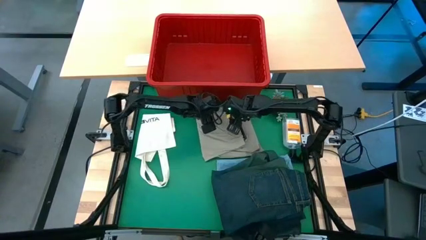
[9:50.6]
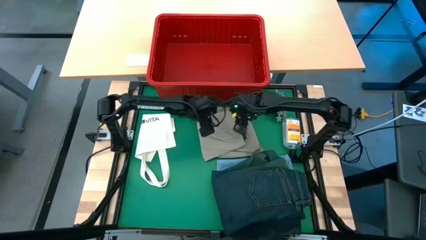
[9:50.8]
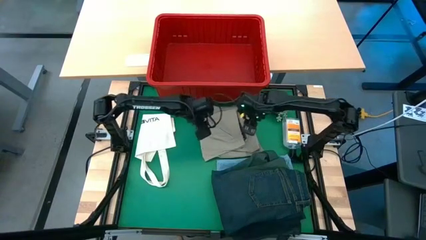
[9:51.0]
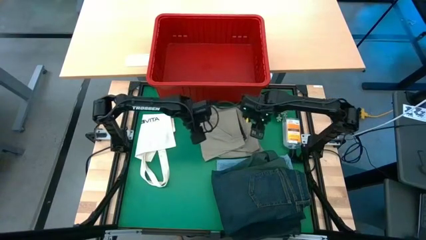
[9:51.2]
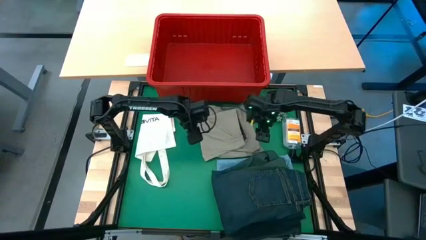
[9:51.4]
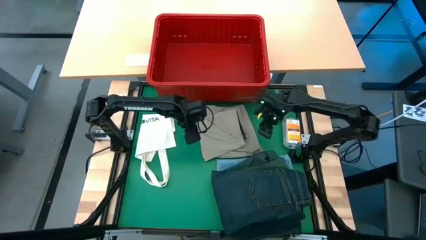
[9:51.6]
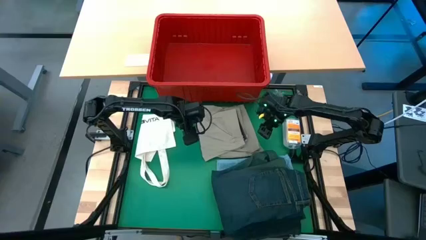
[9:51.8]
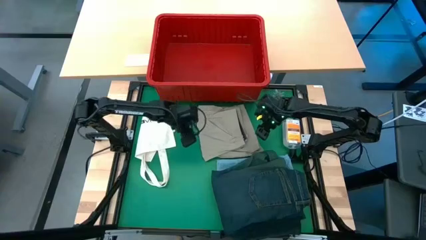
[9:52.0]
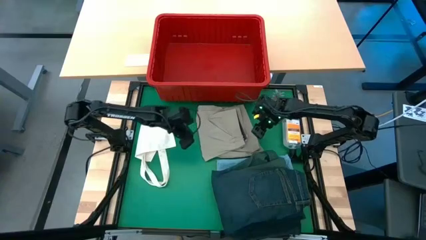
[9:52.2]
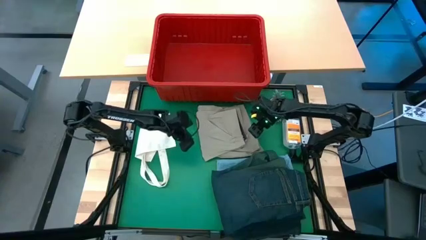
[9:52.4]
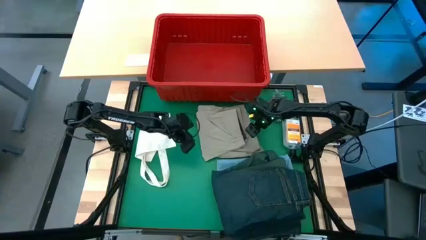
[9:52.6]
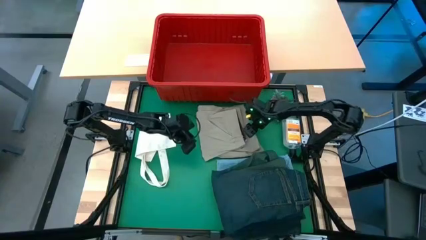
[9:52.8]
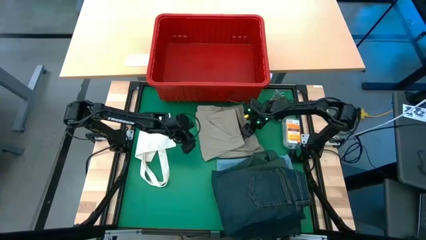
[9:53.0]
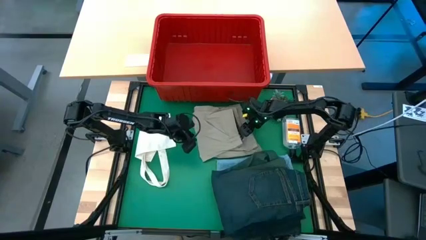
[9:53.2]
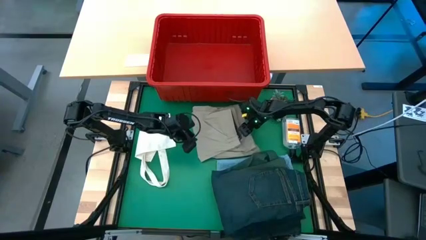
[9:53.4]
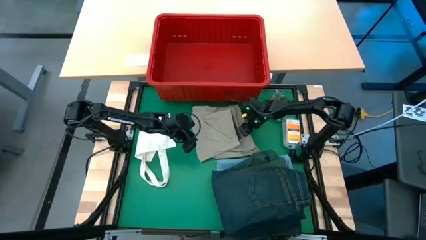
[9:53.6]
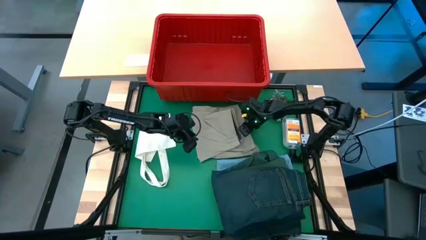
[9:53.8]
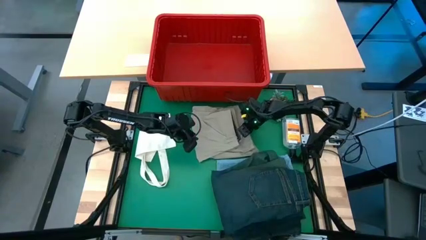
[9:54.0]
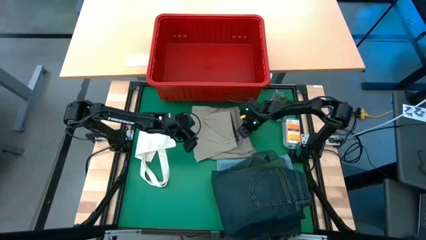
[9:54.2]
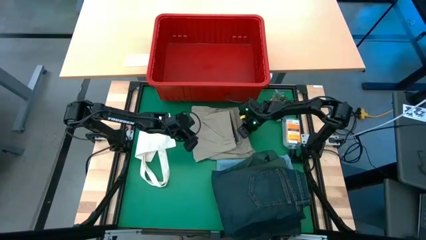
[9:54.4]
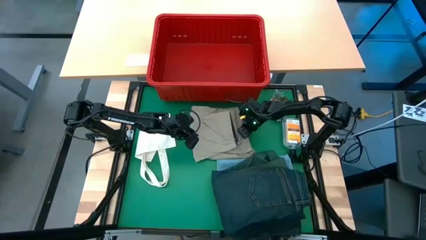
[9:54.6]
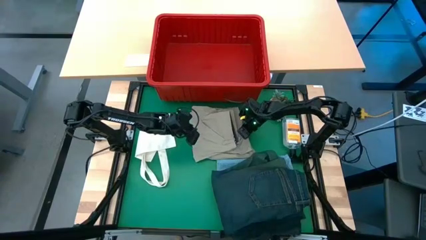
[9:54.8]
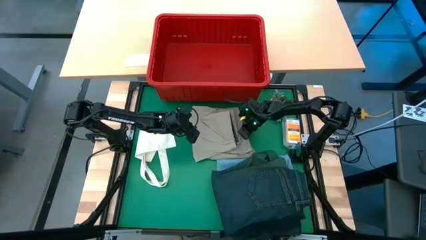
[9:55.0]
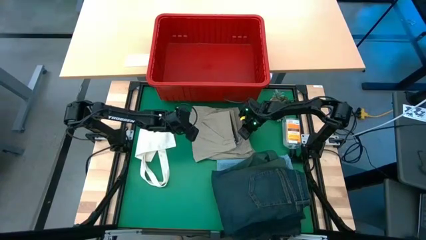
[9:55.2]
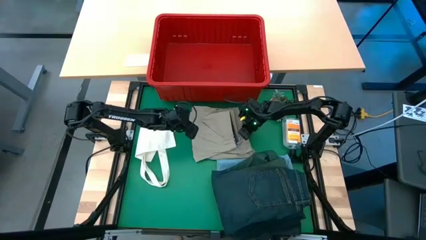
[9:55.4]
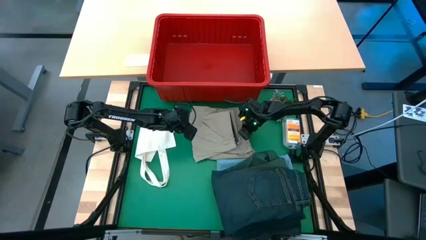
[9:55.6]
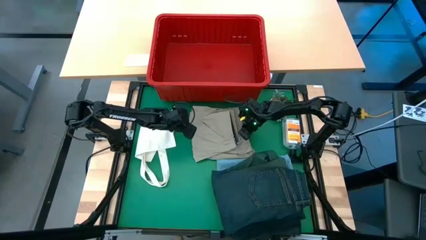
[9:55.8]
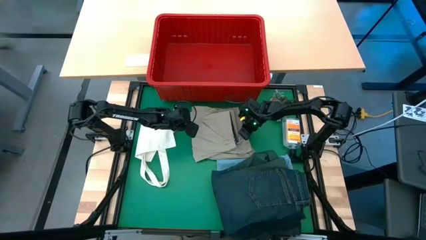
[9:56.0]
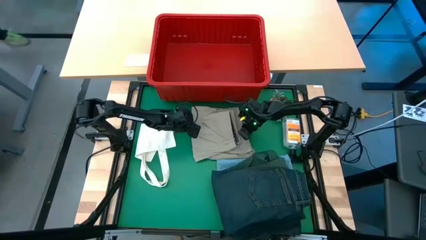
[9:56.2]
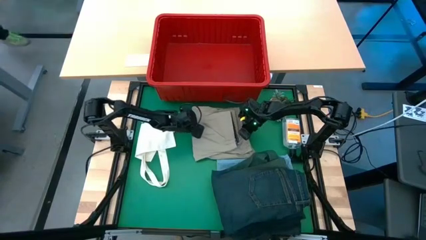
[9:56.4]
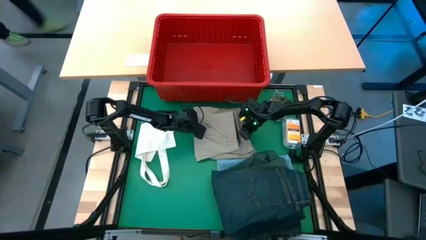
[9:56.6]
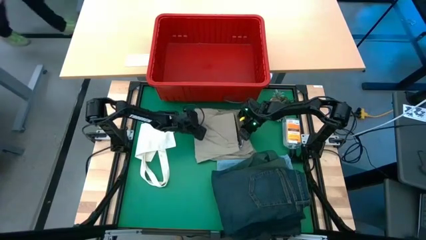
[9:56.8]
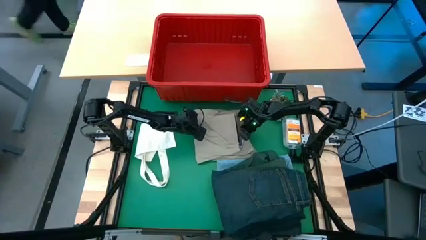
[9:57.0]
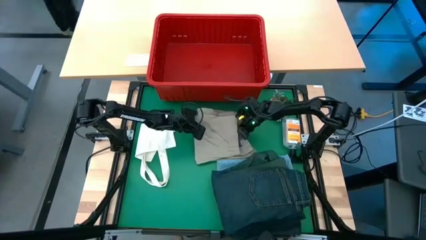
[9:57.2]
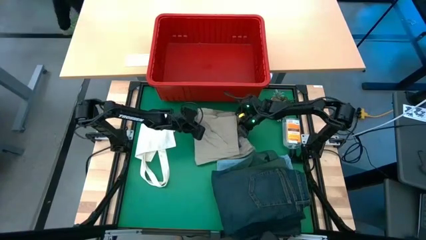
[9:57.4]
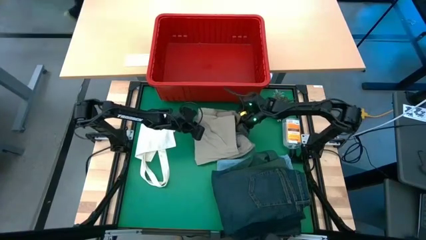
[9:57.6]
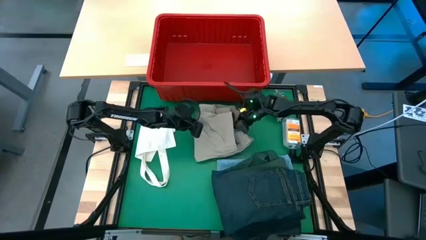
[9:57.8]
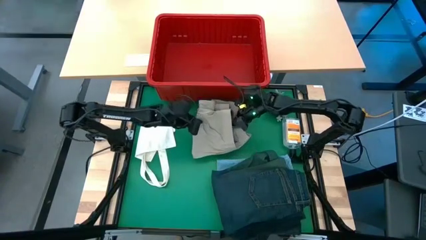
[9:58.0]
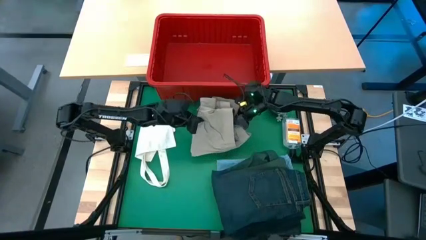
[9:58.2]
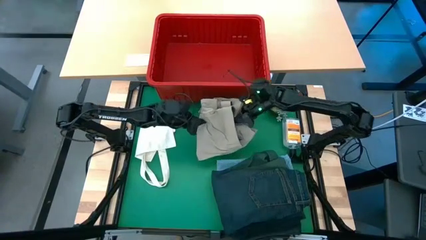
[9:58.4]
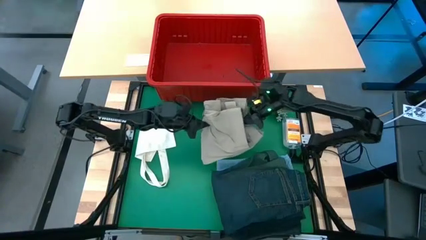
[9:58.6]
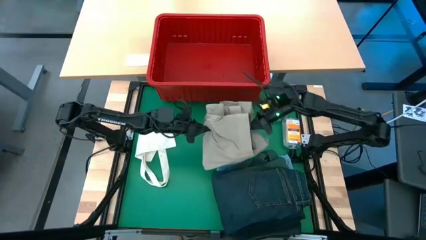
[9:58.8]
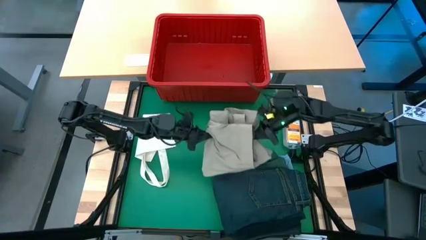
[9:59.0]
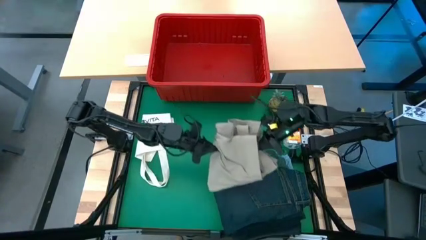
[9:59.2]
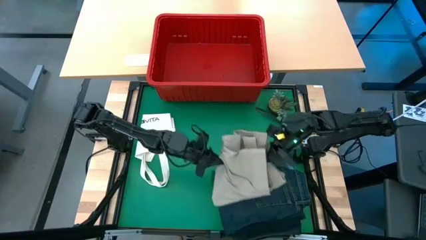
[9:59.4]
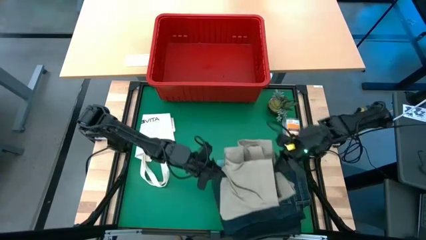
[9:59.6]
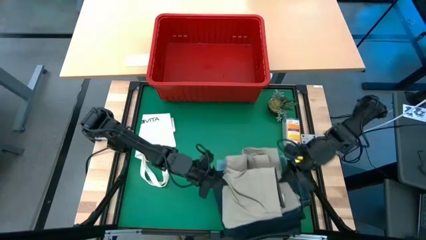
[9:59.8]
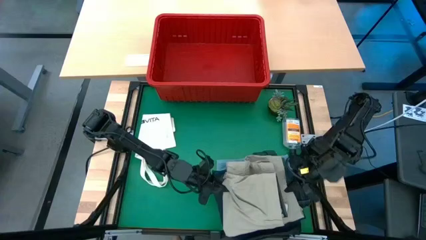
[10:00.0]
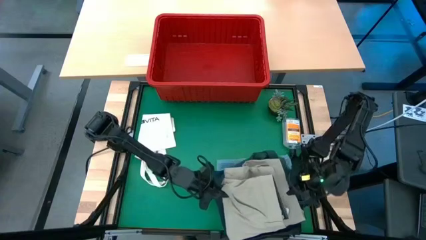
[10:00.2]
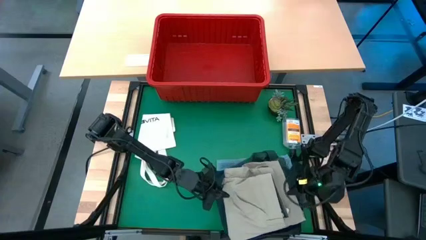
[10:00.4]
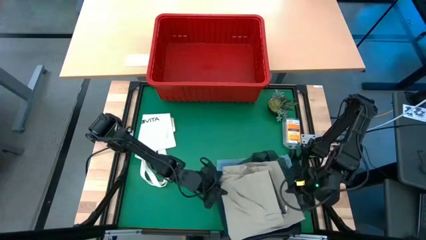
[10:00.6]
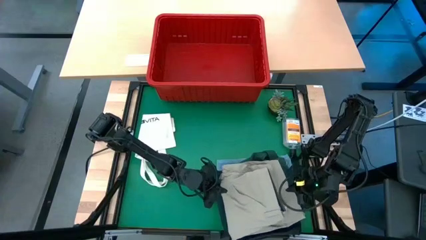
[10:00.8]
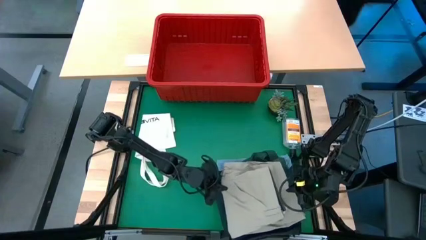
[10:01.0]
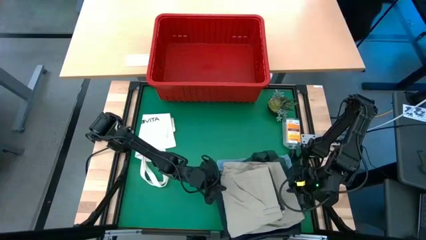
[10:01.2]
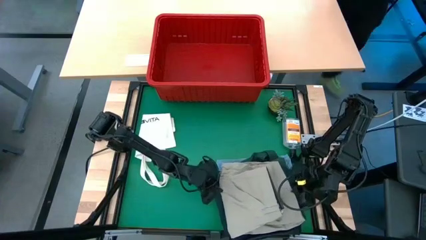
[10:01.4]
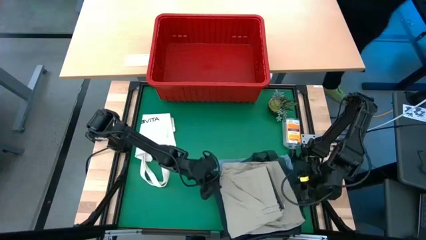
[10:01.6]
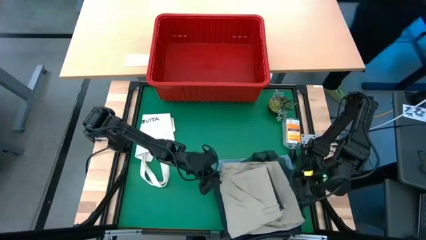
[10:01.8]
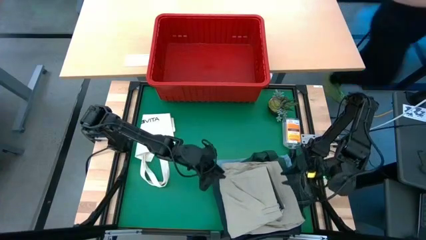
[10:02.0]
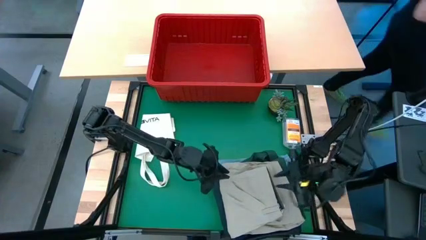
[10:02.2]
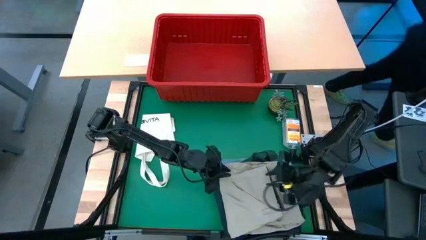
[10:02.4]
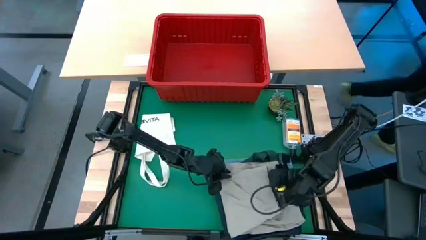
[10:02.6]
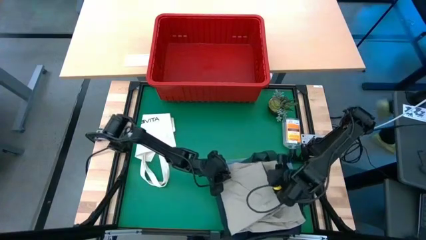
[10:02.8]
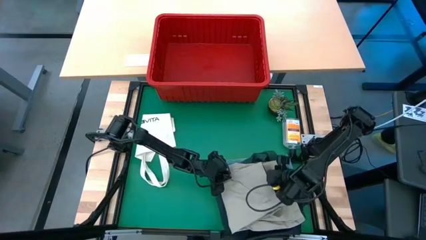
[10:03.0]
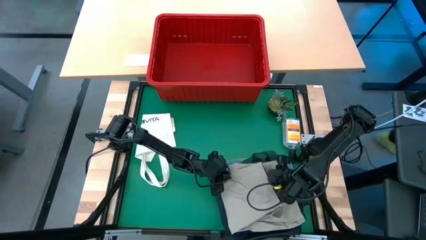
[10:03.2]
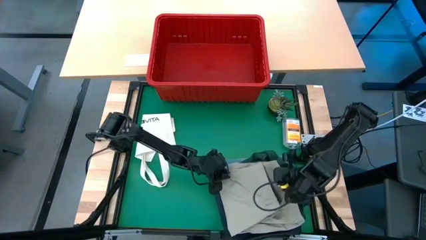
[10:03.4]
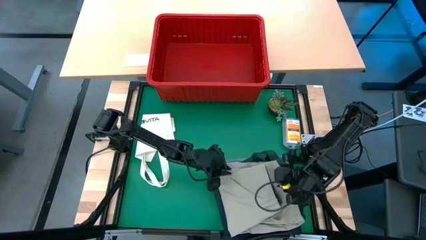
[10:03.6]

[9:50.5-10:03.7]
Task: Fold Laundry from Bin
Stack the brown shorts on top of the dark blue jeans

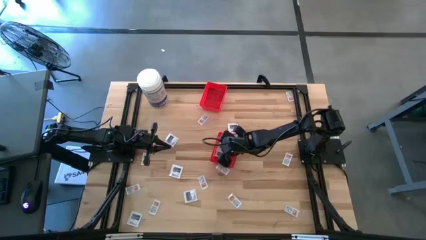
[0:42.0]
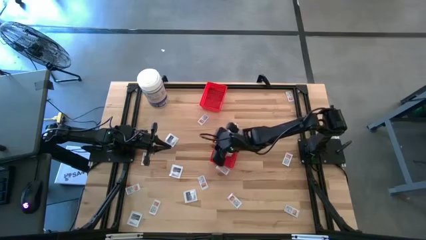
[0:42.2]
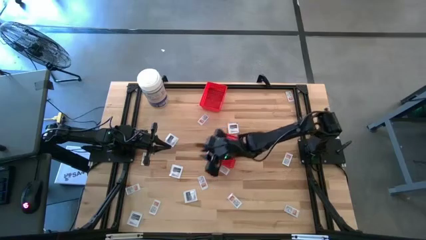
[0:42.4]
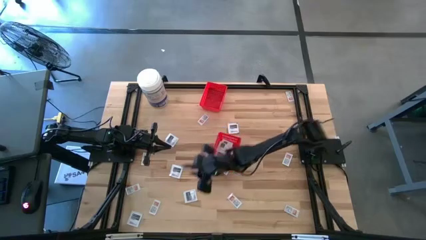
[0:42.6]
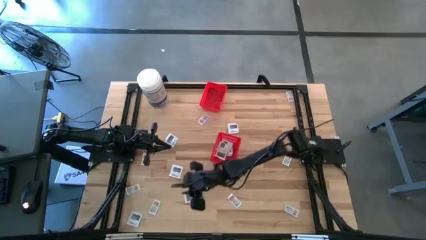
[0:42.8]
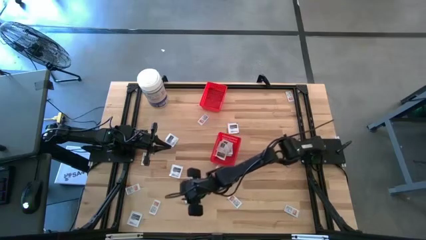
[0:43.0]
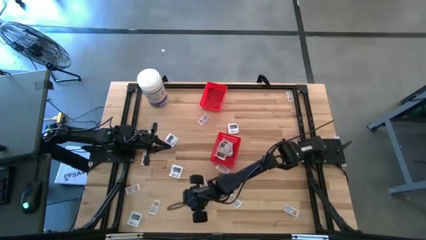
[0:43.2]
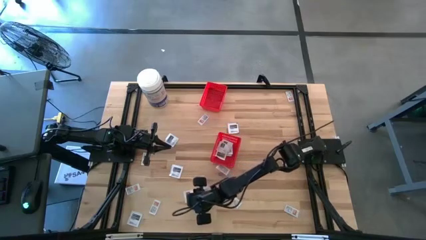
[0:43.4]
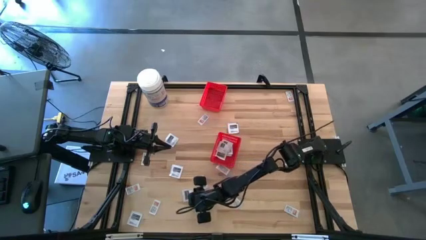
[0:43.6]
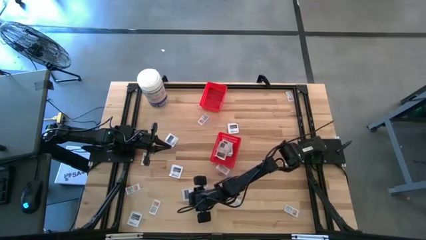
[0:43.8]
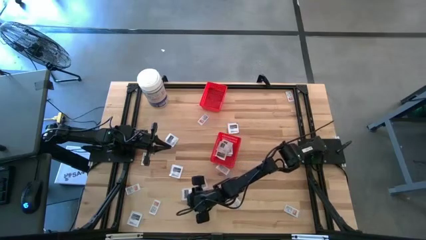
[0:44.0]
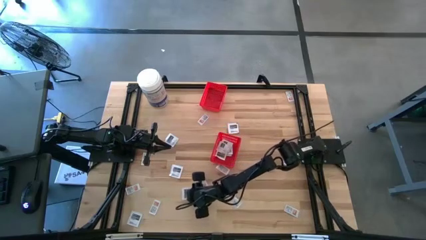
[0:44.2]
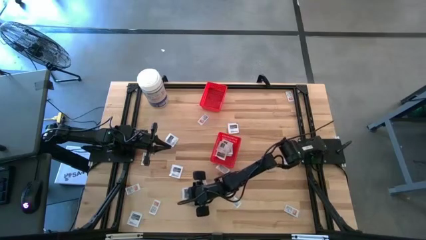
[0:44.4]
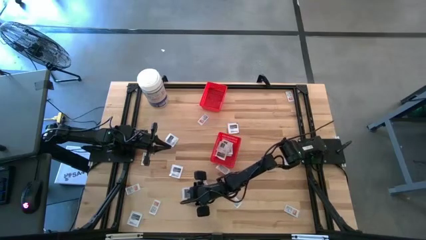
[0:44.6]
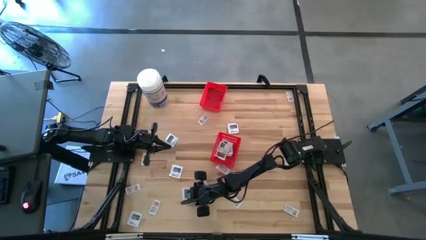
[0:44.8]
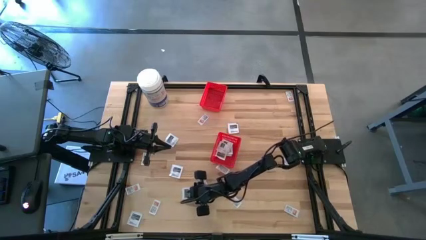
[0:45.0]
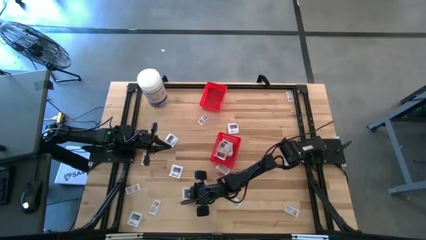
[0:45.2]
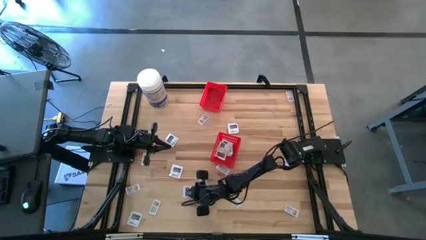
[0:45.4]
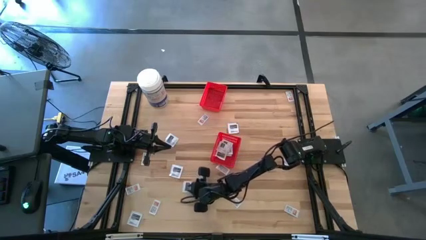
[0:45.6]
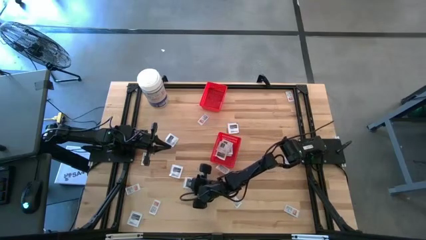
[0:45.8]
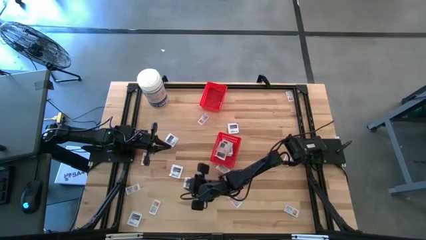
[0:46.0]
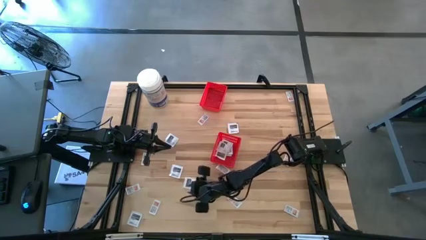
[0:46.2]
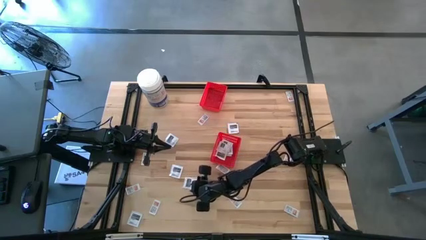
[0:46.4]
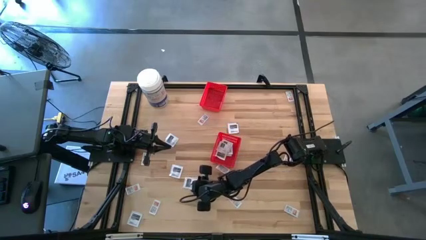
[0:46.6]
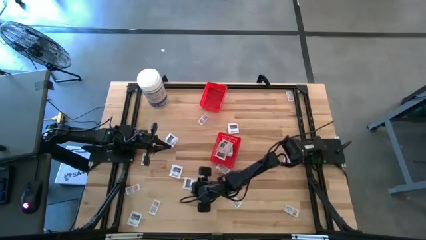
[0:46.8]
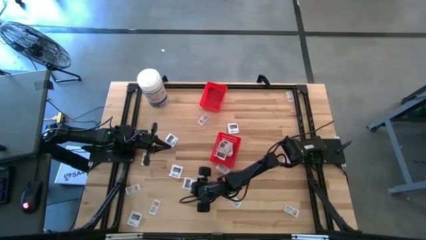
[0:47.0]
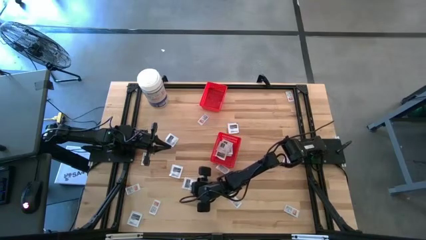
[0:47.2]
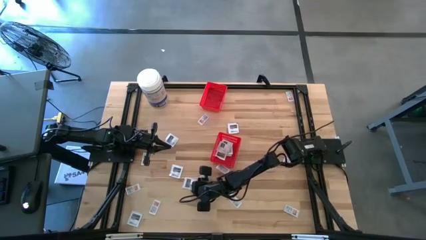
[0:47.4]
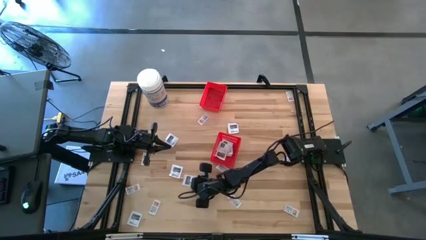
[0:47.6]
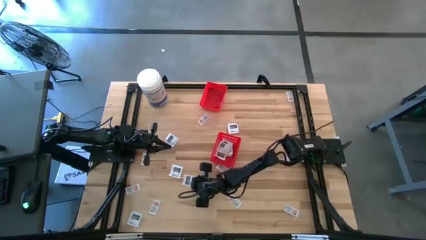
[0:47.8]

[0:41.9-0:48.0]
Task: Pick & Place First Aid Supplies
Put the white towelette pack into the bottom red bin
